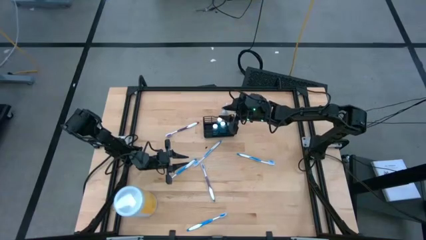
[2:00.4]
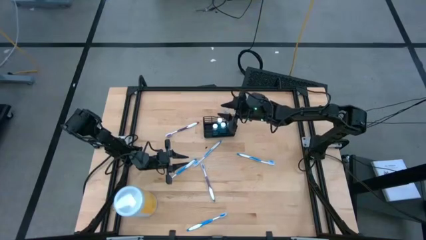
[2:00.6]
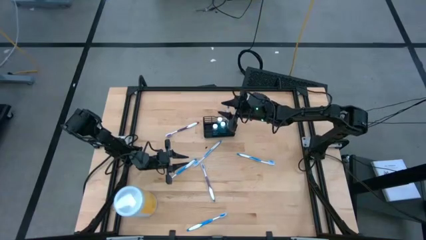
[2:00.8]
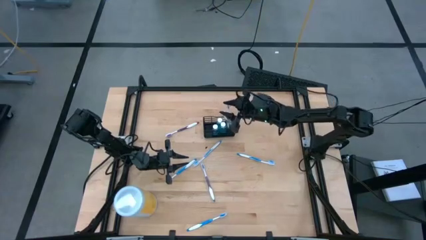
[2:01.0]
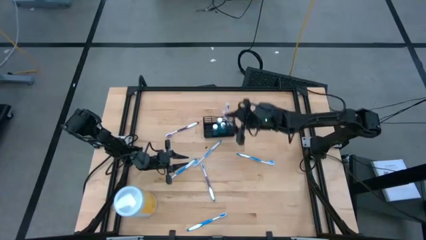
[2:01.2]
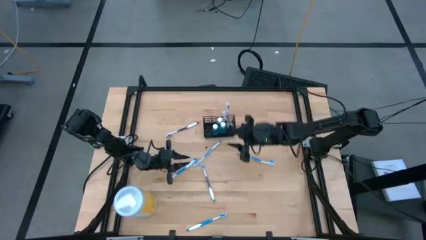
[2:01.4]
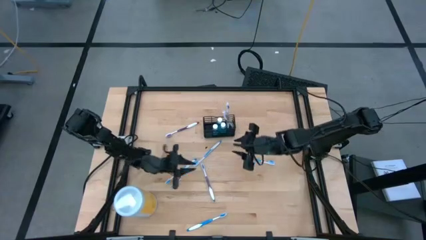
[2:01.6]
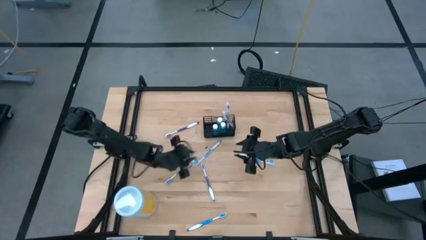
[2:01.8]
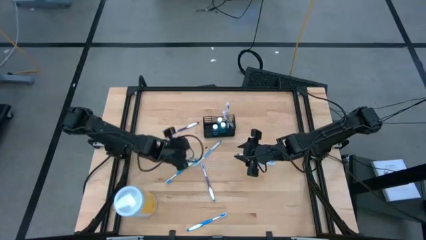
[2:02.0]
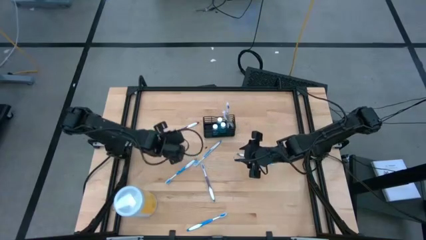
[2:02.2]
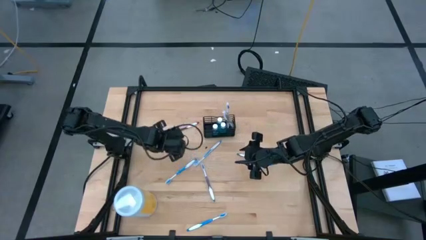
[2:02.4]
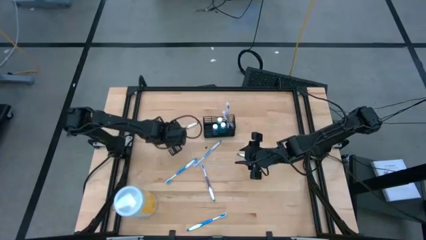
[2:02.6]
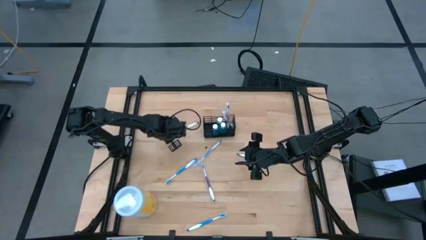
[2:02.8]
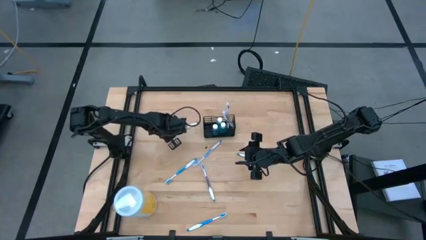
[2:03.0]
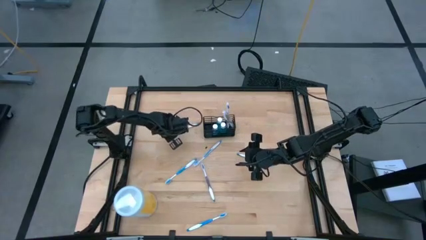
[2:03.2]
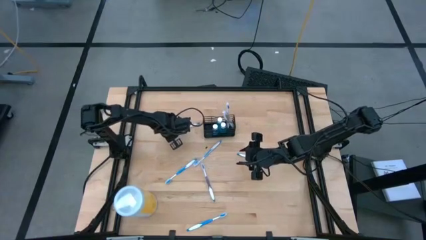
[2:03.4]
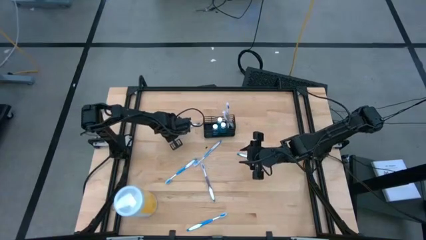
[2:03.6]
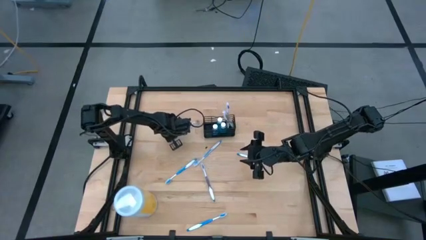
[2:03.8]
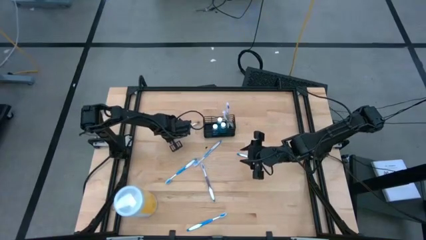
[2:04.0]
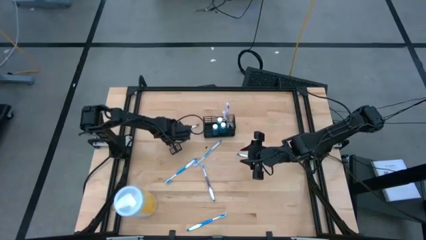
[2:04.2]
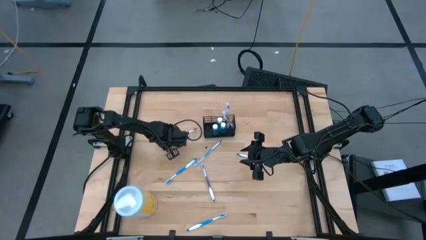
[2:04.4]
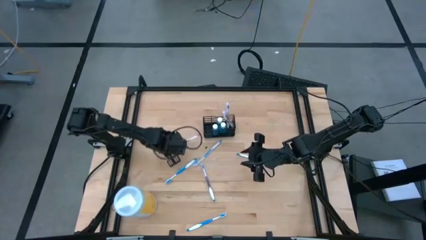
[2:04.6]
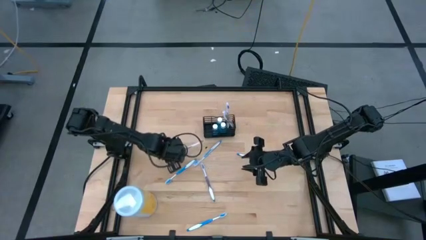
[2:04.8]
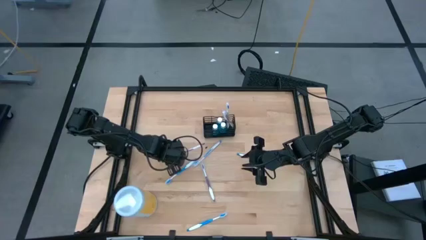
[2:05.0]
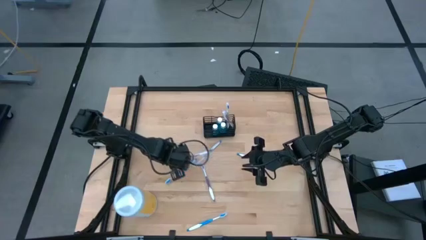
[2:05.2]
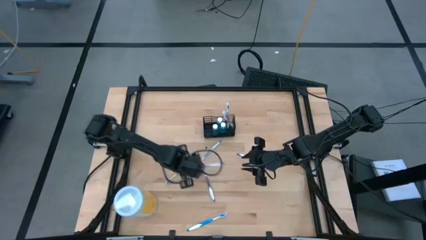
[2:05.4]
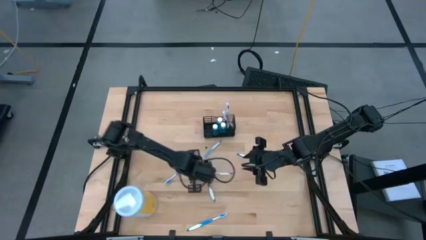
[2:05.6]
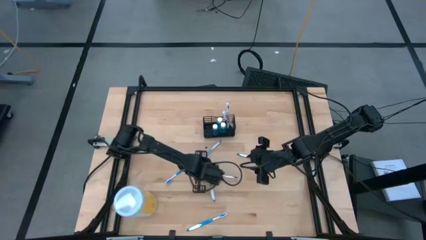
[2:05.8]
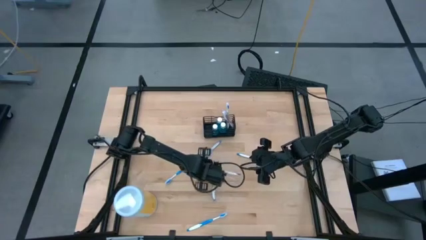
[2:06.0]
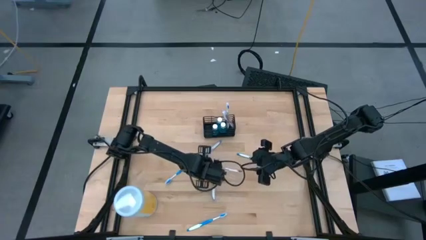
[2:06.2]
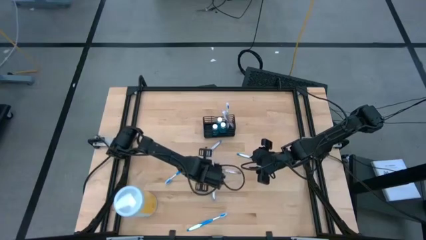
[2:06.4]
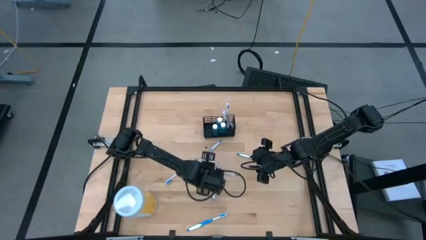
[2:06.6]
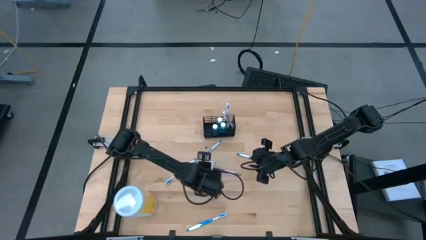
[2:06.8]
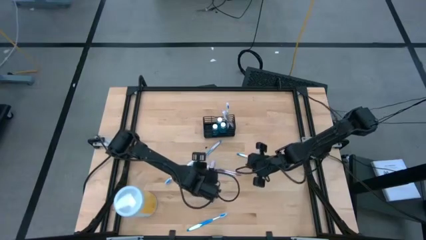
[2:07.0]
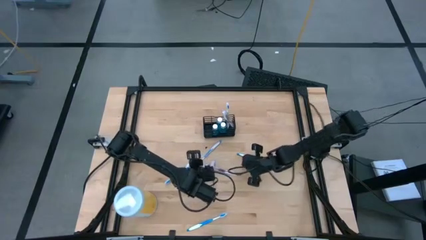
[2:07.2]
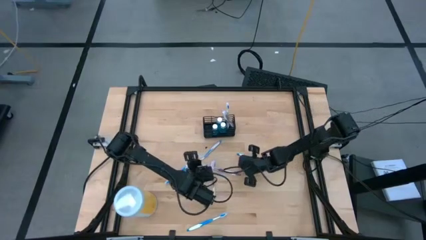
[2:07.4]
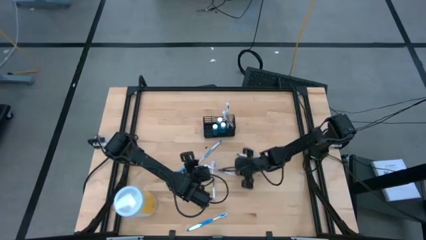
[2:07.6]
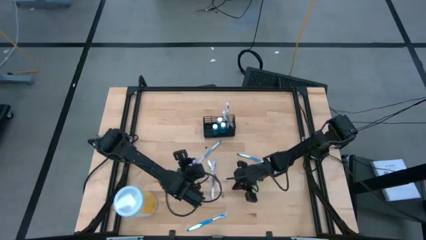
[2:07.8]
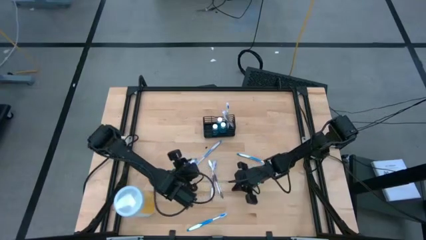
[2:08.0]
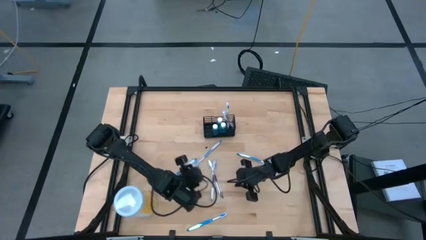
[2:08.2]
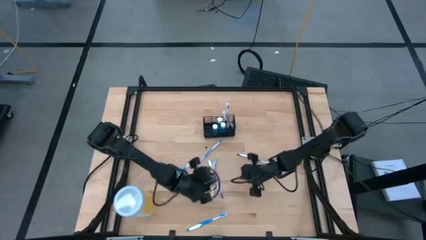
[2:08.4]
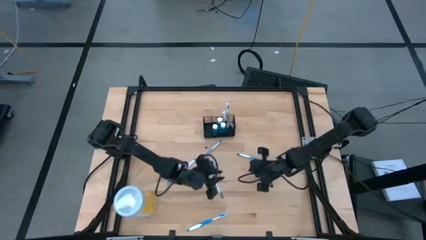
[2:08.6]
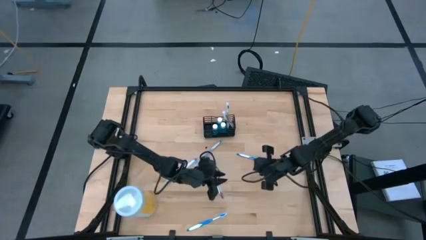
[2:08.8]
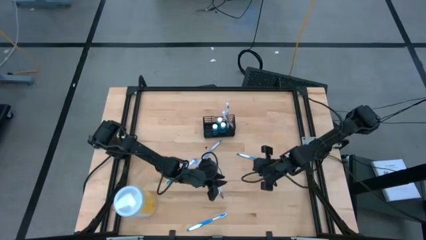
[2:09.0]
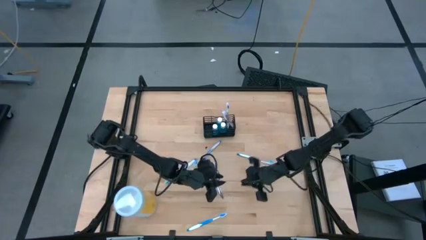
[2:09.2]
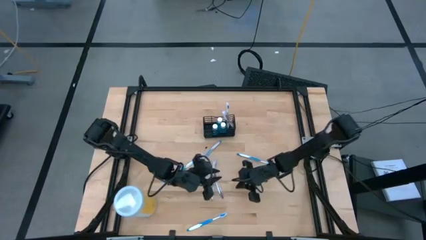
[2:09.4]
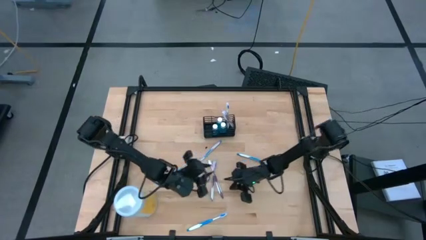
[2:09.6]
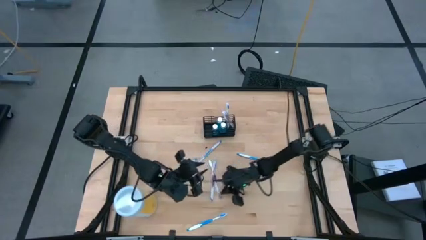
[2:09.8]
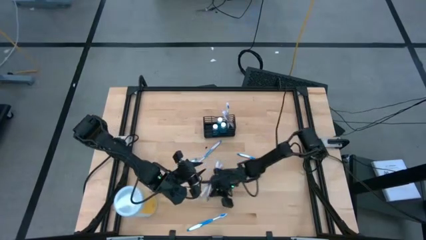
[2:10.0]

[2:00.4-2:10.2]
Task: Pick & Place toothbrushing station
Put the purple toothbrush into the black organizer

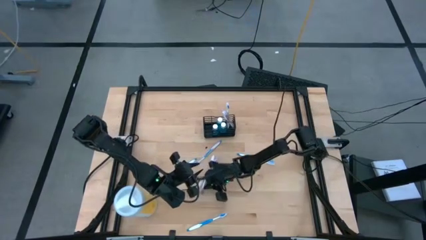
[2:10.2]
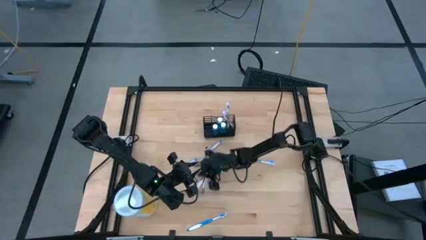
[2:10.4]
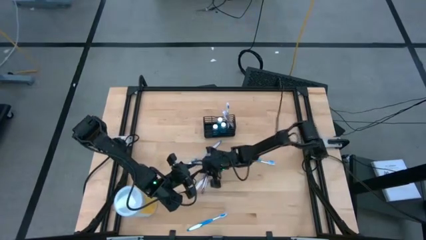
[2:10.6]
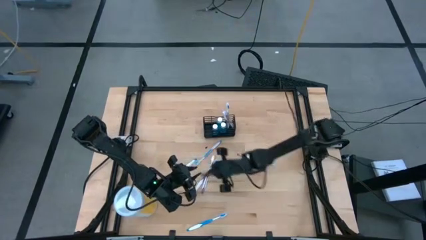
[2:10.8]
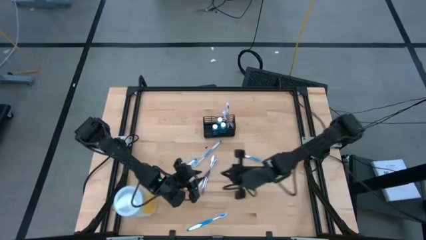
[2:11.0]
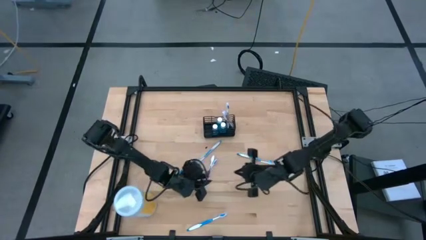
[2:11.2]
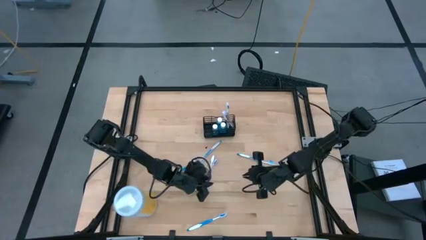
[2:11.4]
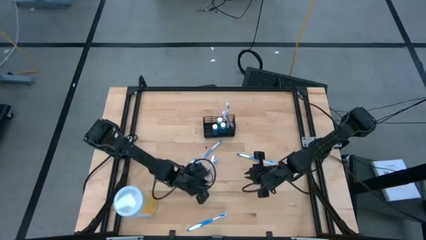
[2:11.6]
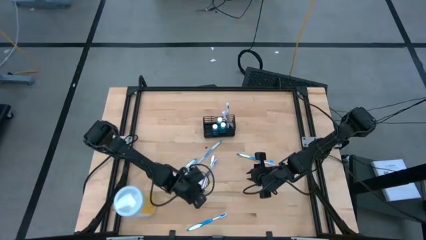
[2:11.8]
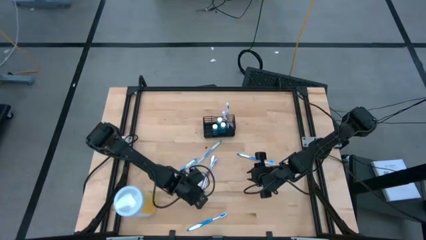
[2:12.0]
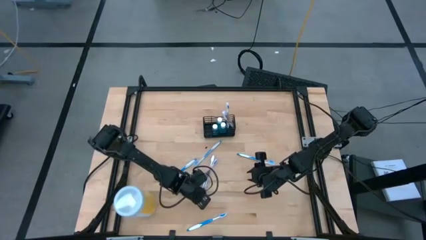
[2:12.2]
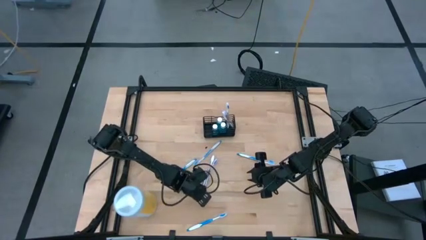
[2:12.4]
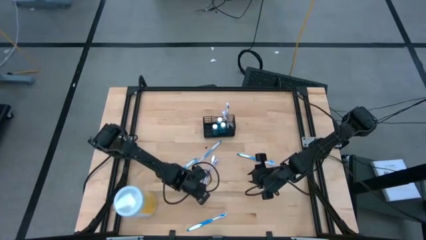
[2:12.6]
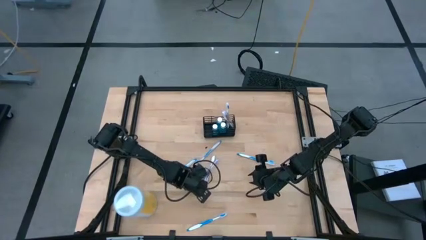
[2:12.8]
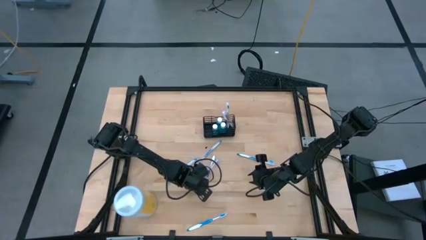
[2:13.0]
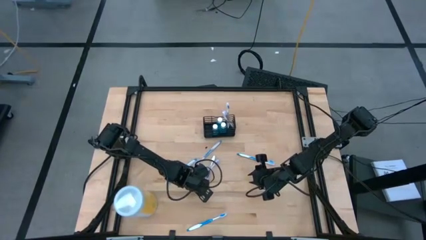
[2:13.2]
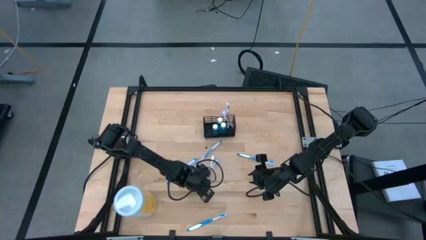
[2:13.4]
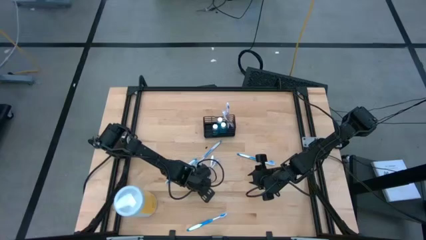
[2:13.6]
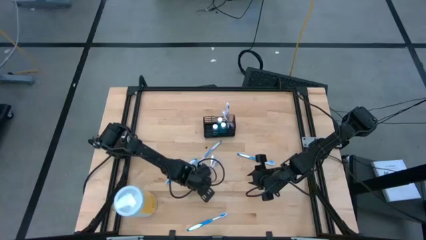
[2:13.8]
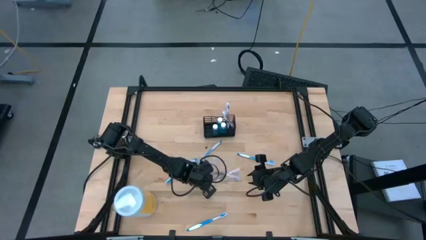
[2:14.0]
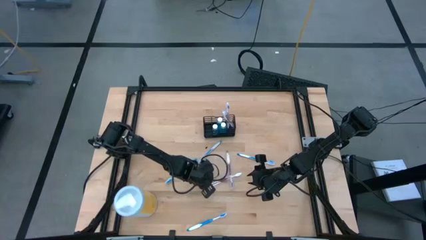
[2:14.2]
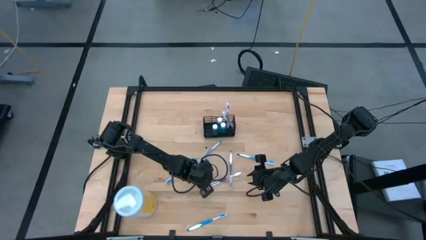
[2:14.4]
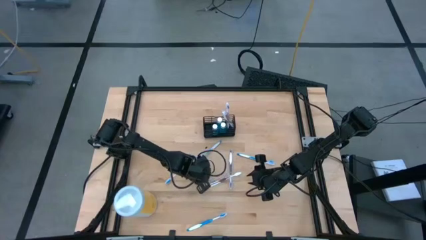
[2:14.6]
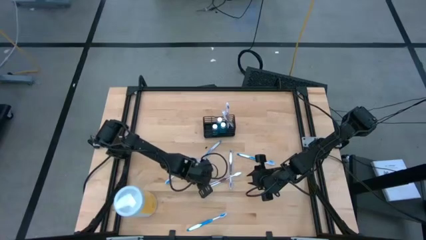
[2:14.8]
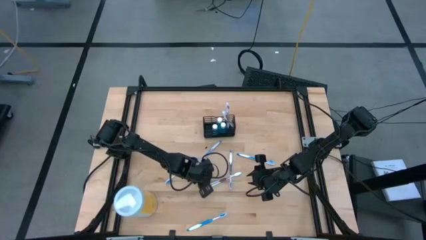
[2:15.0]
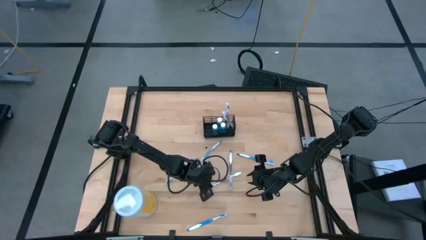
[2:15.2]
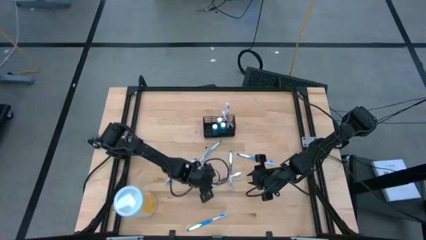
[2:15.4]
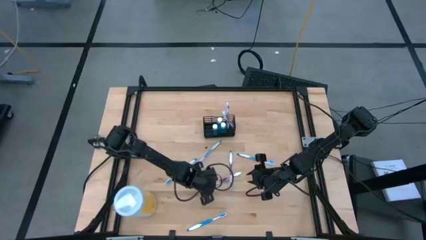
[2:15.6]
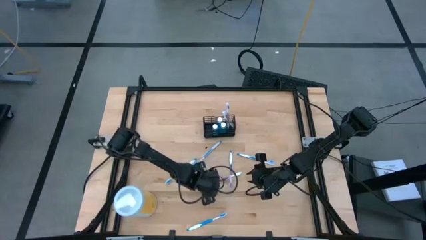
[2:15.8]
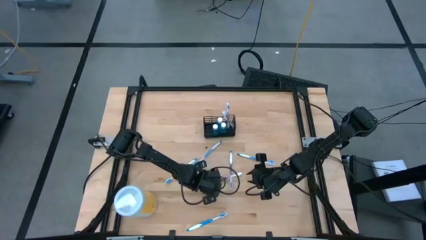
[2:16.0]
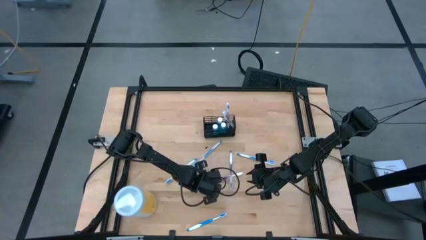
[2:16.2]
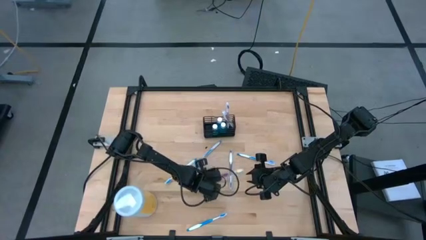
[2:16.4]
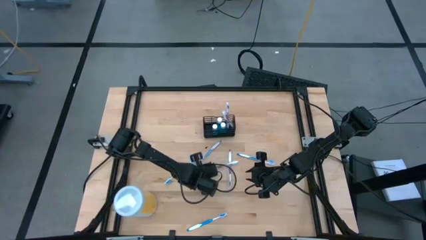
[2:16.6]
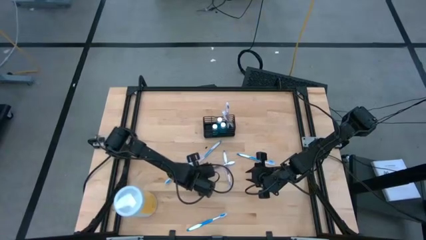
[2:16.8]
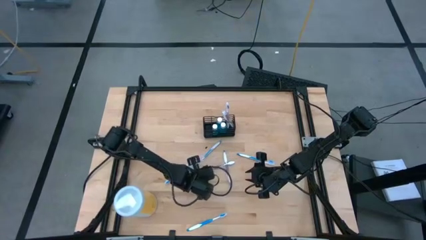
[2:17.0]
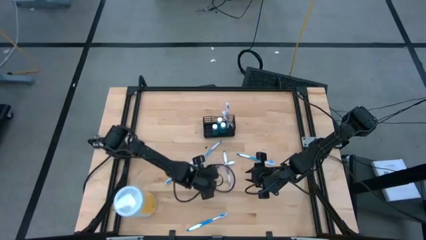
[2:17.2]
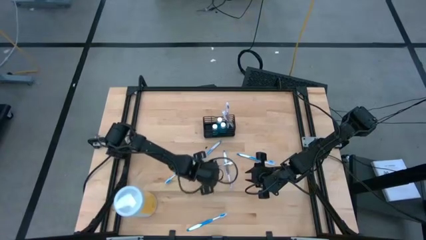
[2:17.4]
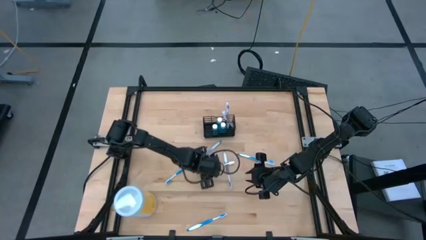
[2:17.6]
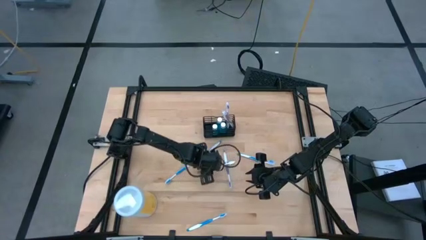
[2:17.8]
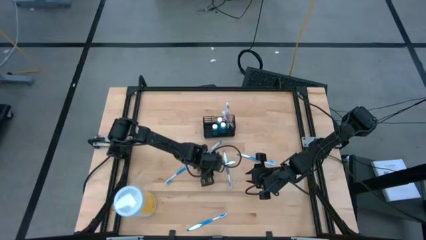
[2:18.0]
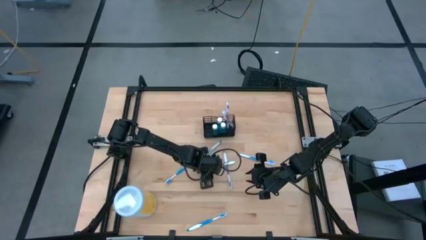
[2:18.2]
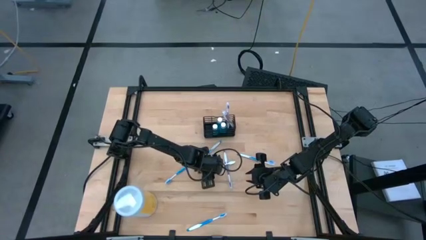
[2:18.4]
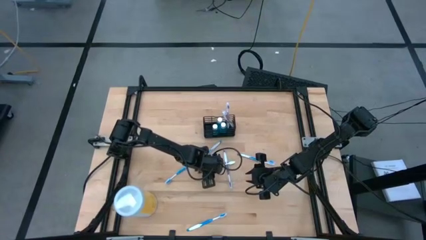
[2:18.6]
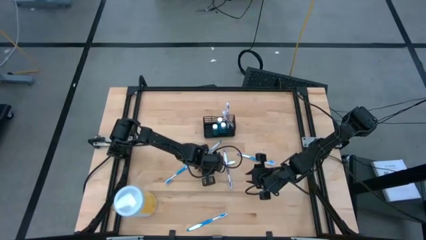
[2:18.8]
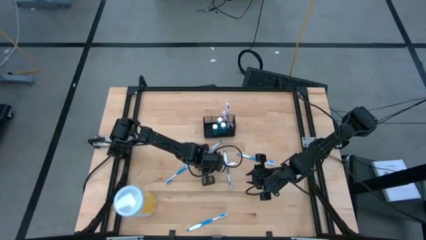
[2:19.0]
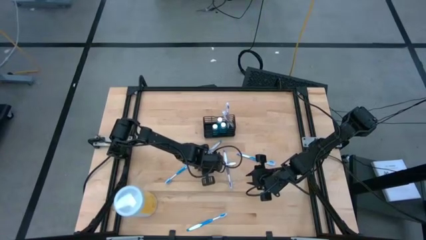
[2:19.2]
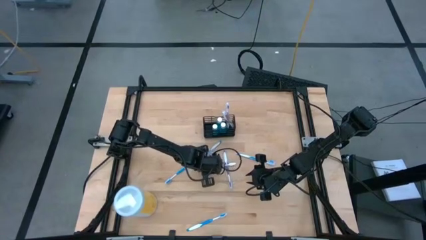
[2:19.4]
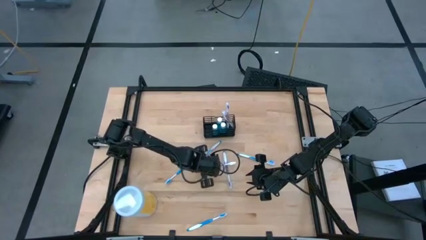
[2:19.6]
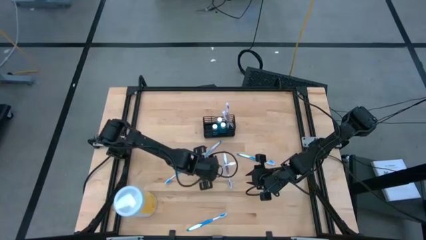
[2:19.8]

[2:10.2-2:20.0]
Put the purple toothbrush into the black organizer
